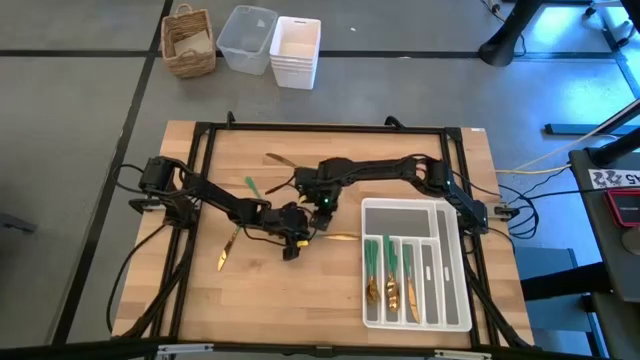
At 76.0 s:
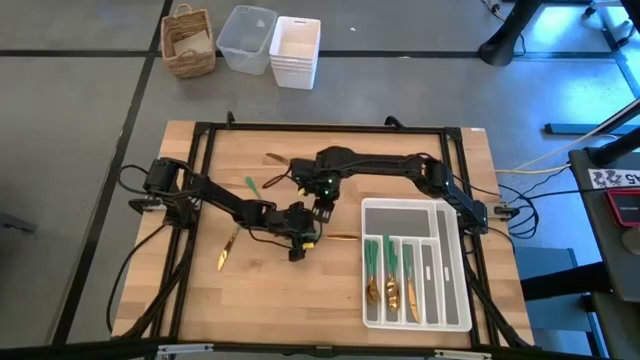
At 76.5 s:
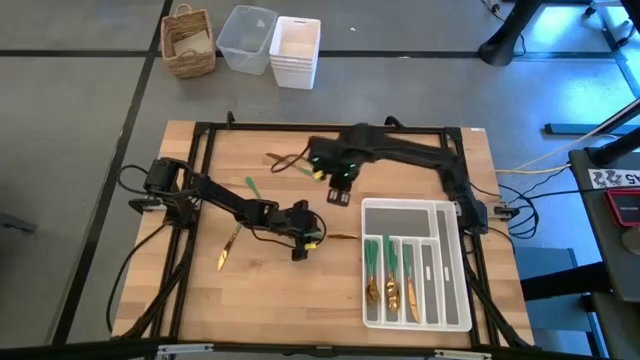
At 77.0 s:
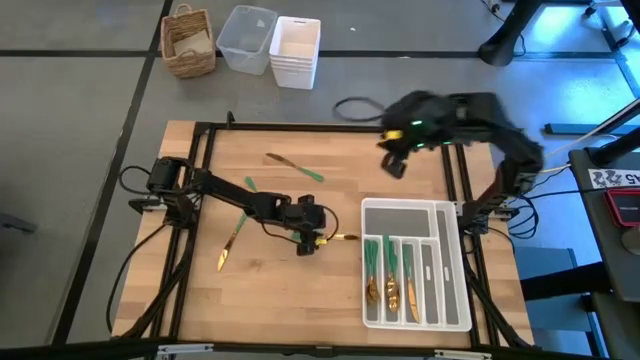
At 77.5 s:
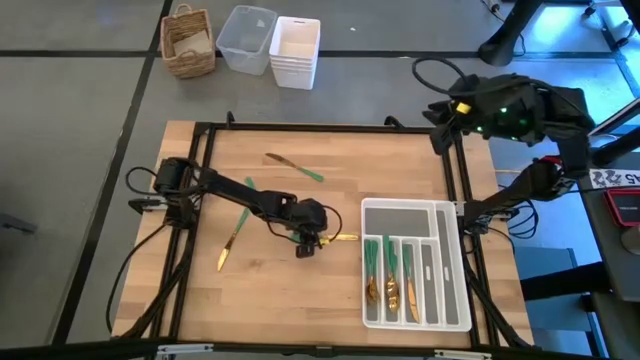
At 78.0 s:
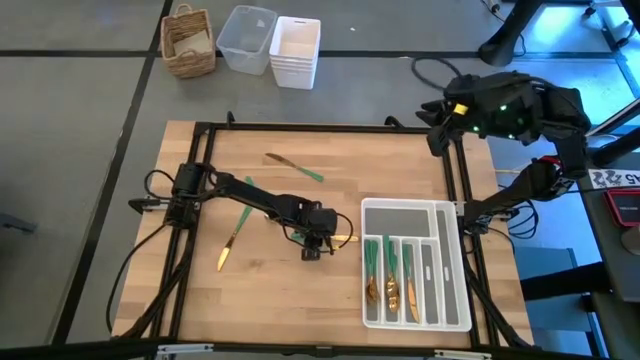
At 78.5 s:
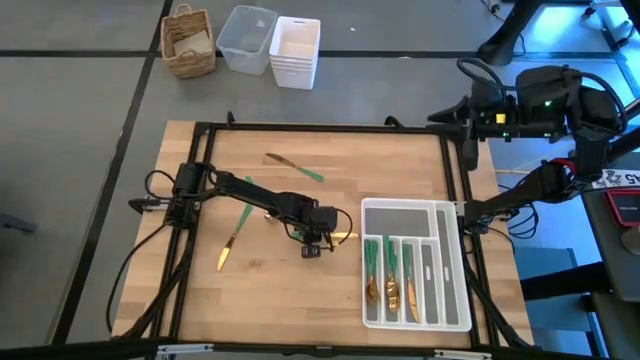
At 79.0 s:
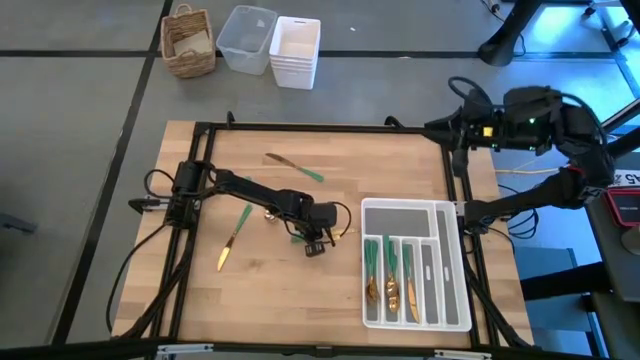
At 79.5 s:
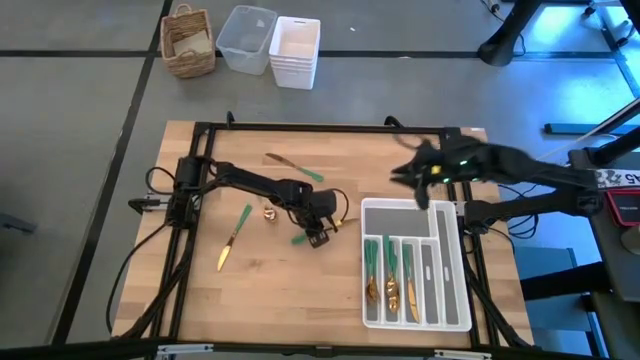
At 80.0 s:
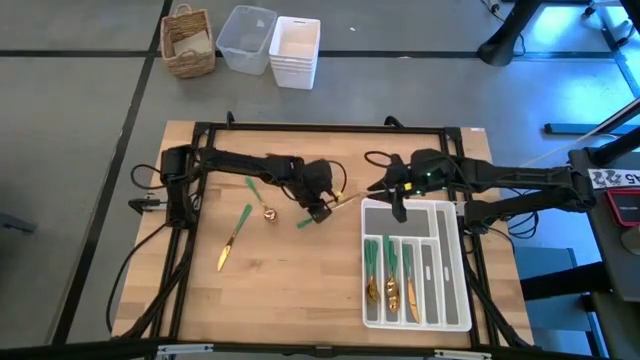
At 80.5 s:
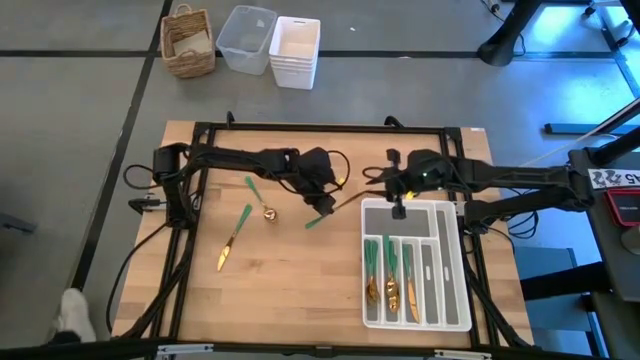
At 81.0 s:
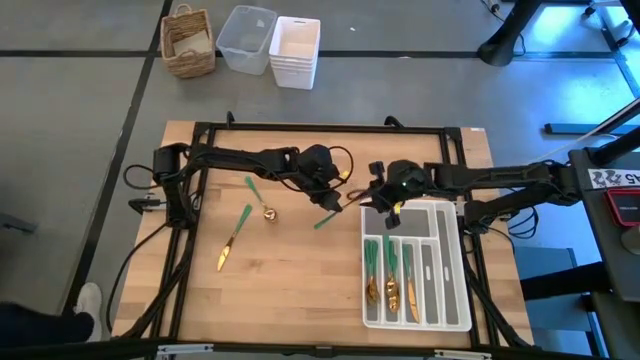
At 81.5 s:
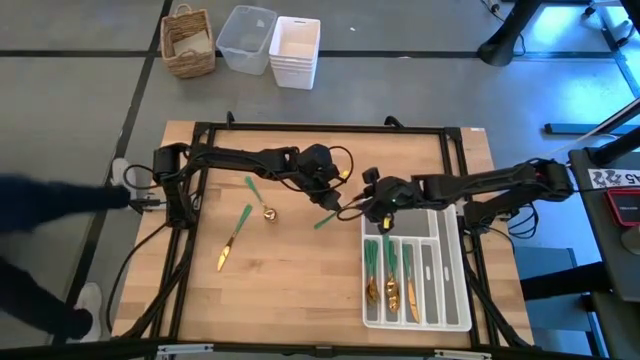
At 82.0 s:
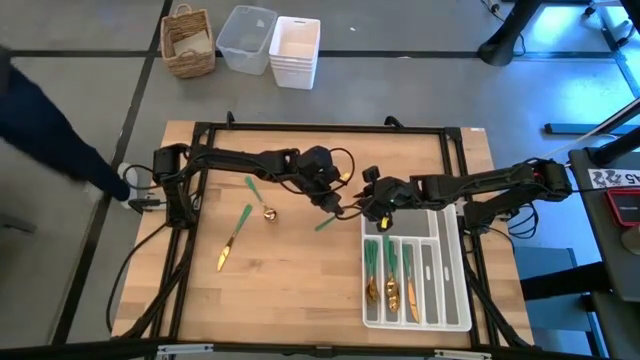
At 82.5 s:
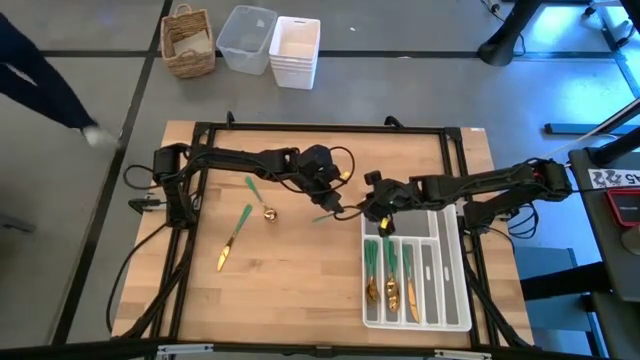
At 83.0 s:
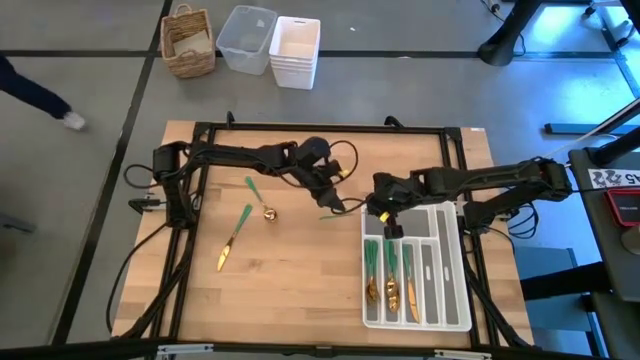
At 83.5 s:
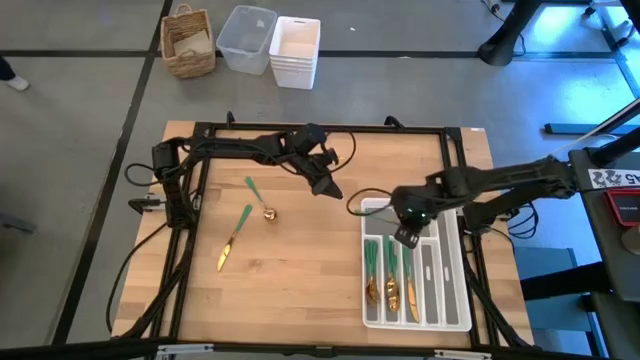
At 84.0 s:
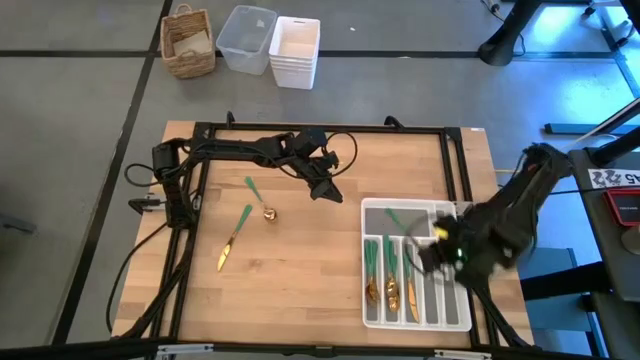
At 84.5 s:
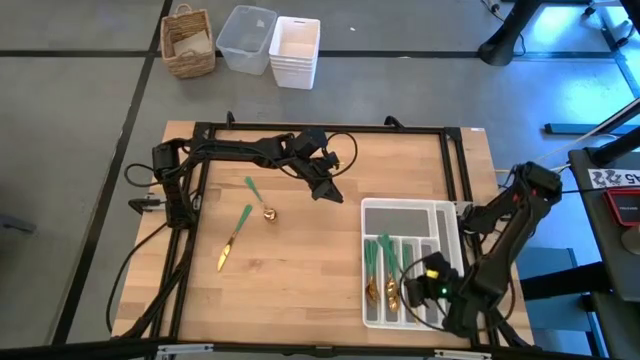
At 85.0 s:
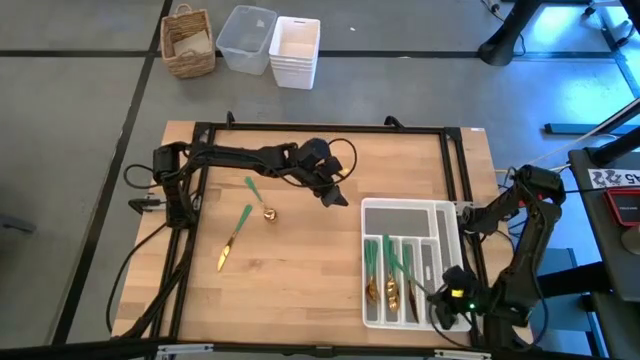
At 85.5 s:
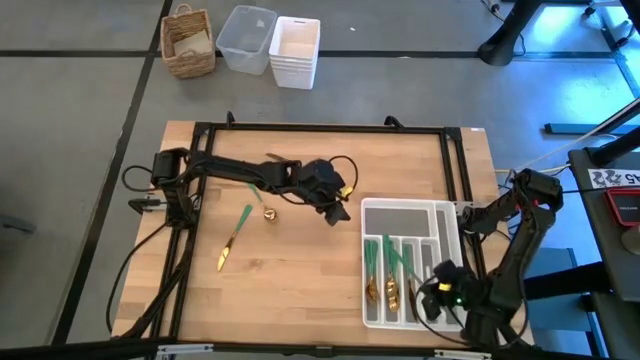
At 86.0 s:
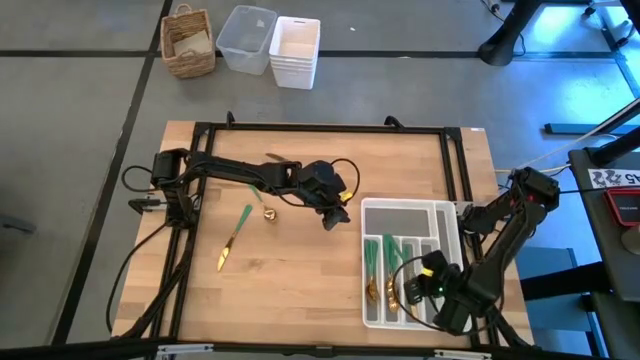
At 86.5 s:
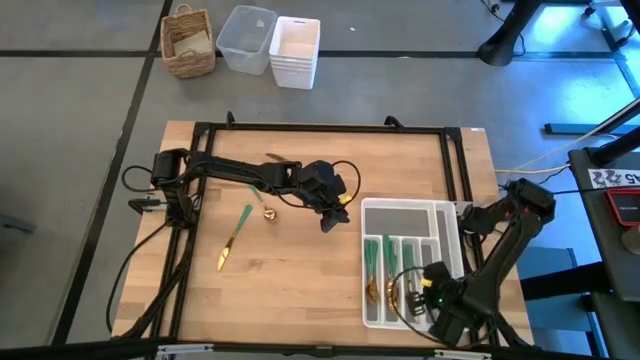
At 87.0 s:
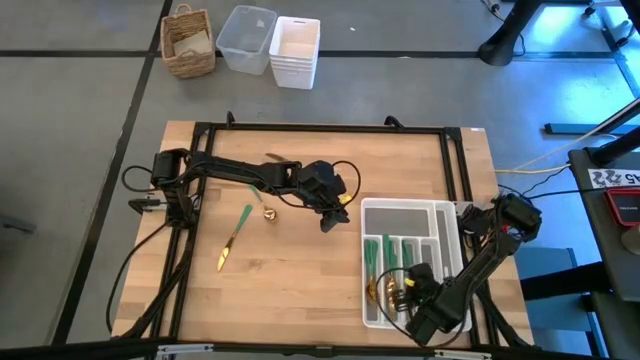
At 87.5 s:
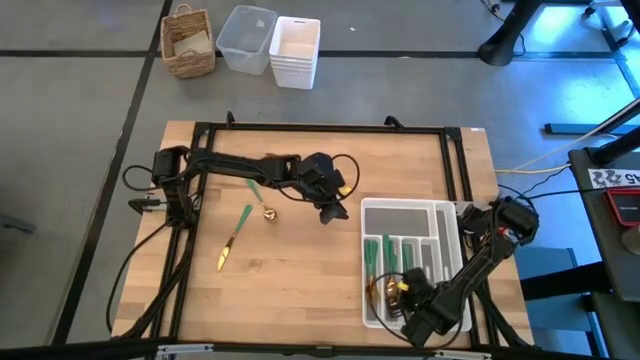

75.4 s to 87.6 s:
Task: Sort silverware
Put the green table in the white silverware tray

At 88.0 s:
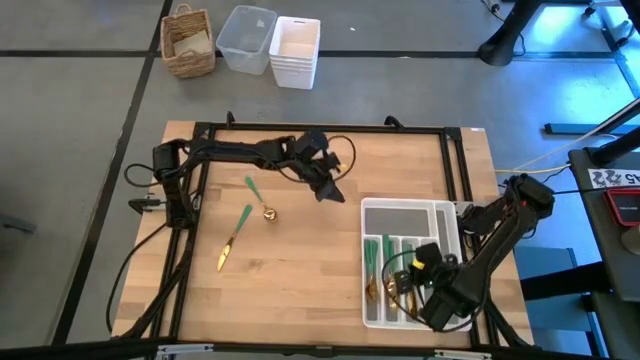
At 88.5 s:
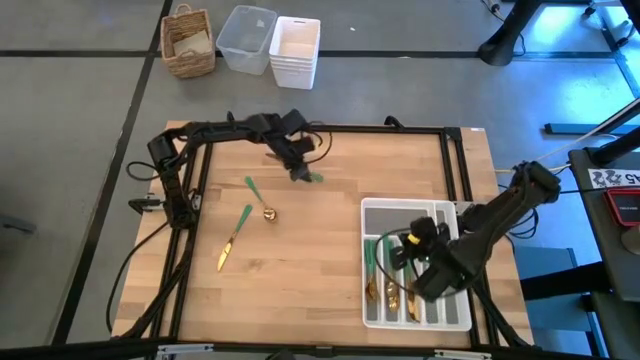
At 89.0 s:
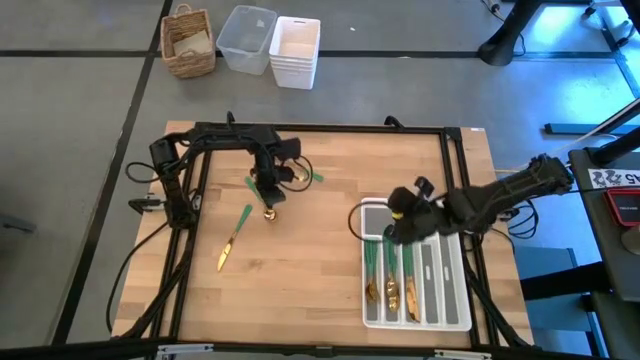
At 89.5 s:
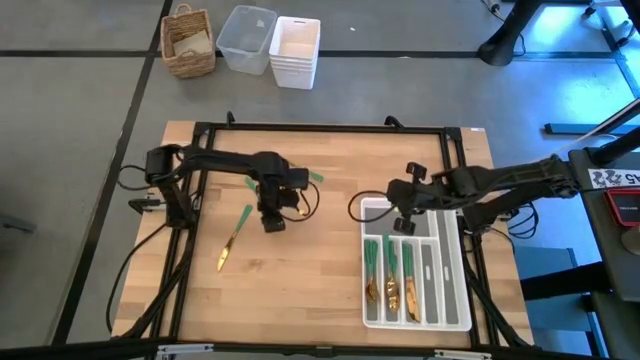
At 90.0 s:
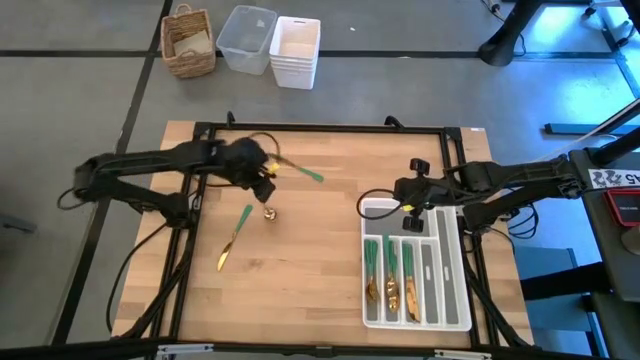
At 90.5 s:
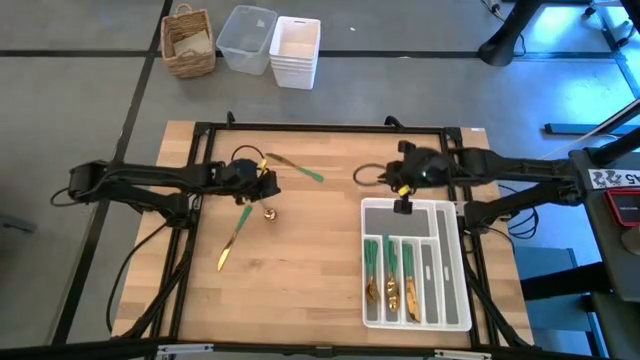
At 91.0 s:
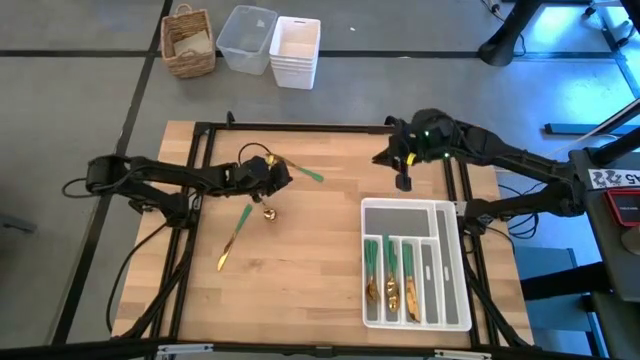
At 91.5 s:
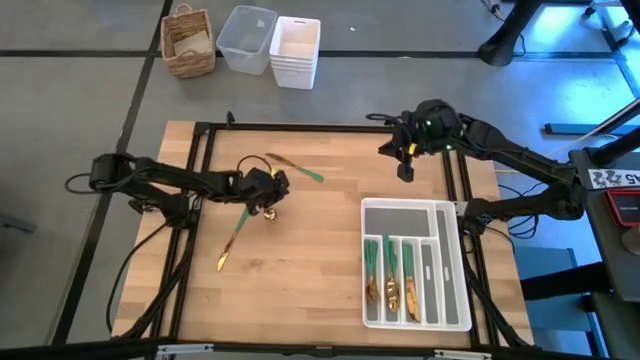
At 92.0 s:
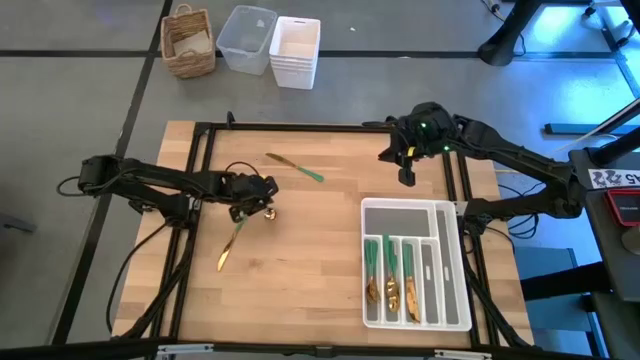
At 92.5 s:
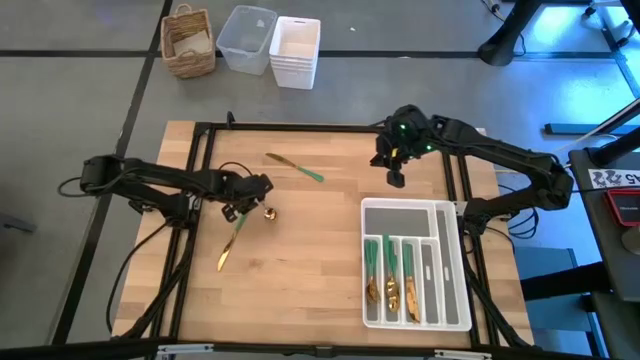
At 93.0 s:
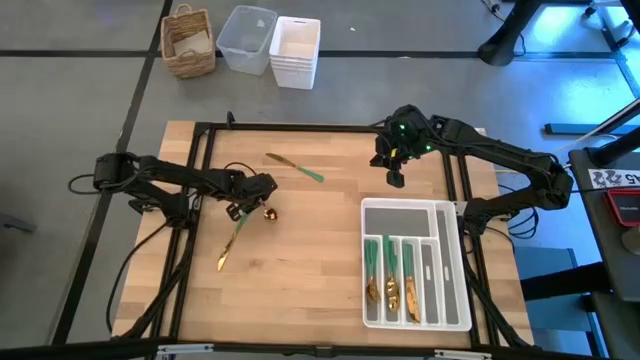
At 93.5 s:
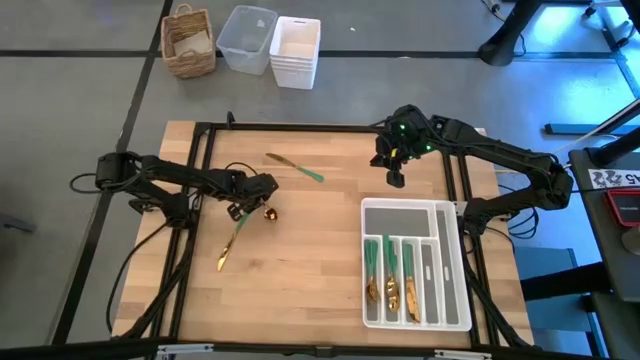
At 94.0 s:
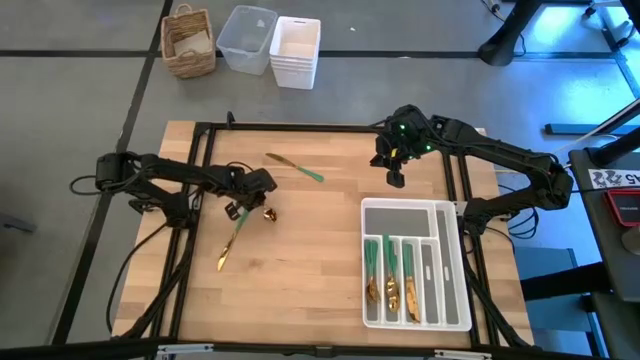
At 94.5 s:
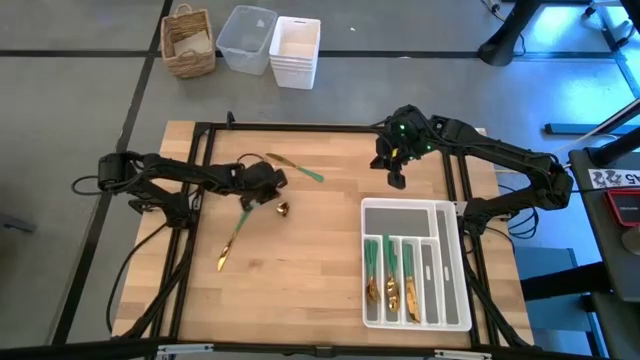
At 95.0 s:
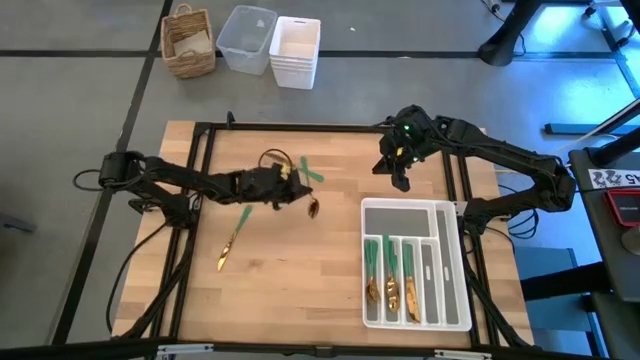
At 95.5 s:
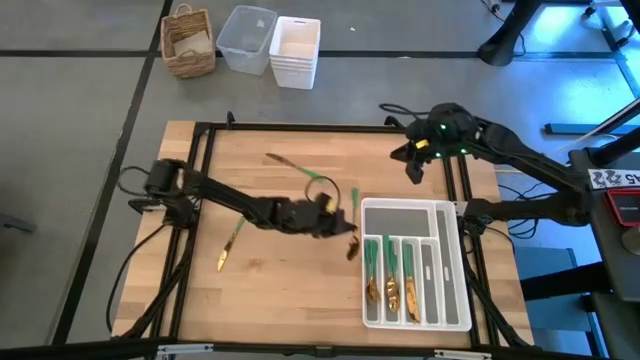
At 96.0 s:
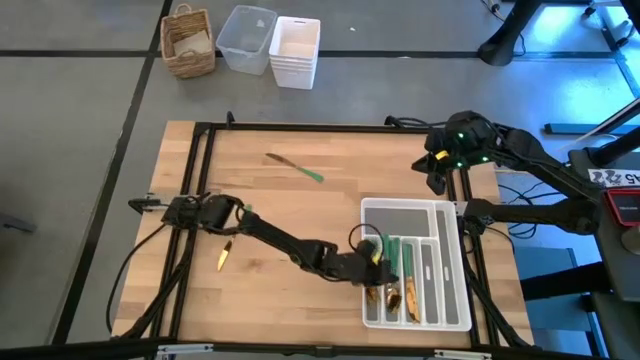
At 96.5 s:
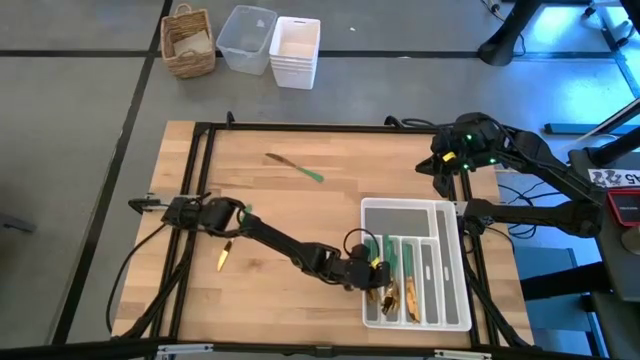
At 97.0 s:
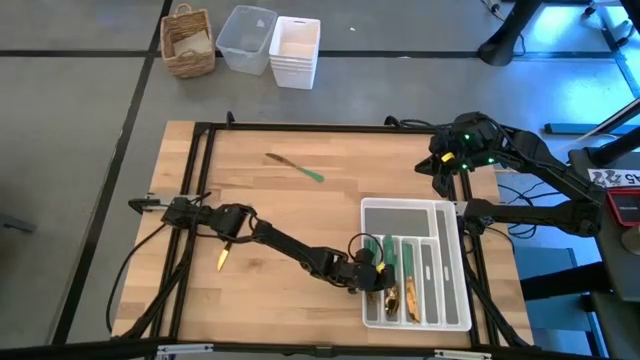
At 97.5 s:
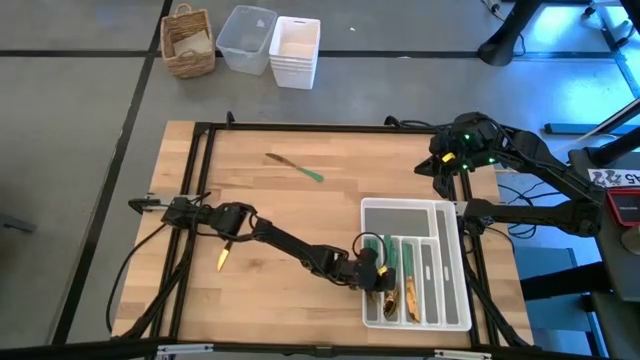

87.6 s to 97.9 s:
Put the green spoon in the white silverware tray
